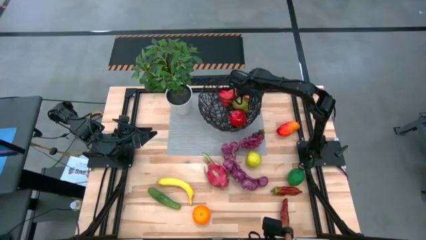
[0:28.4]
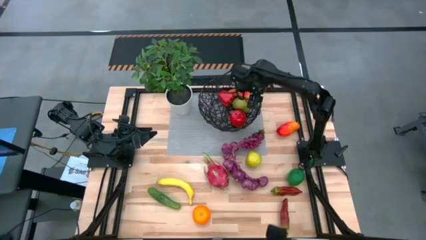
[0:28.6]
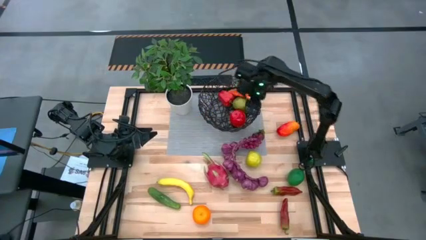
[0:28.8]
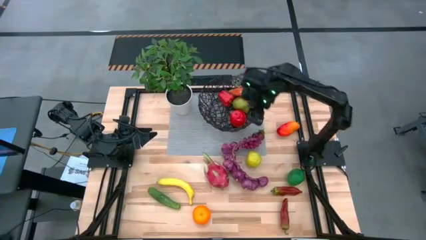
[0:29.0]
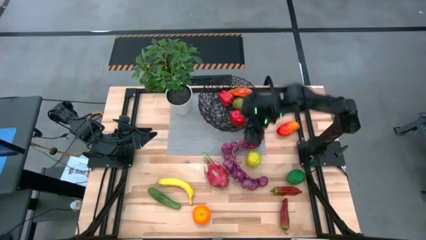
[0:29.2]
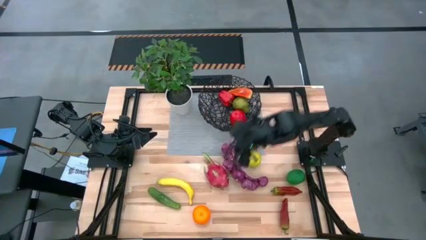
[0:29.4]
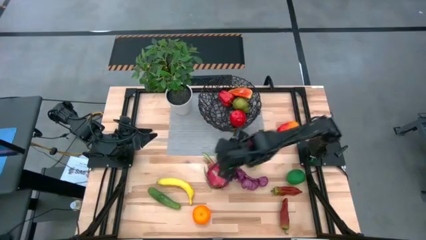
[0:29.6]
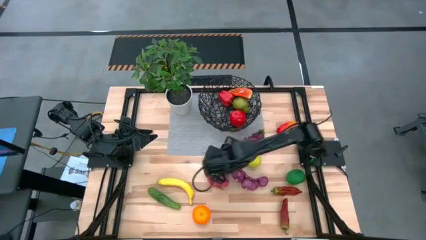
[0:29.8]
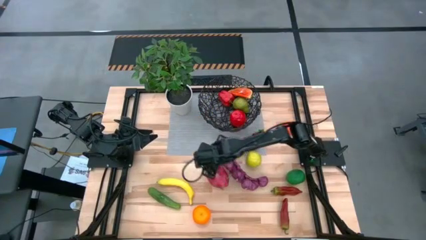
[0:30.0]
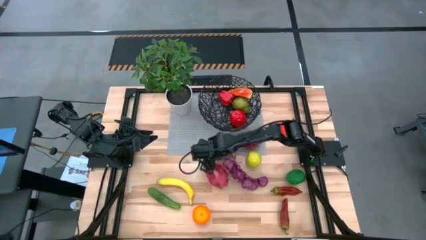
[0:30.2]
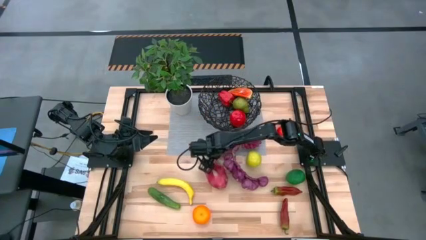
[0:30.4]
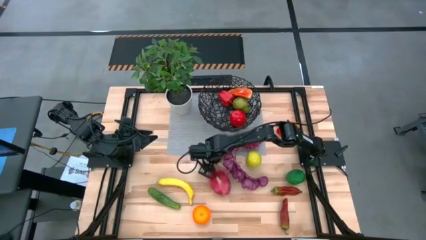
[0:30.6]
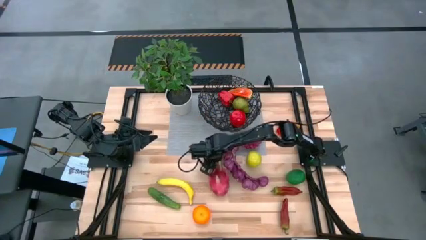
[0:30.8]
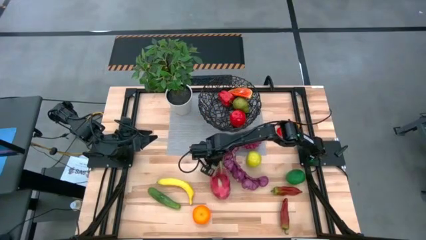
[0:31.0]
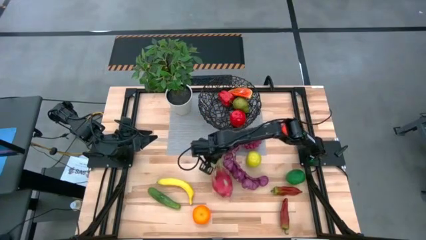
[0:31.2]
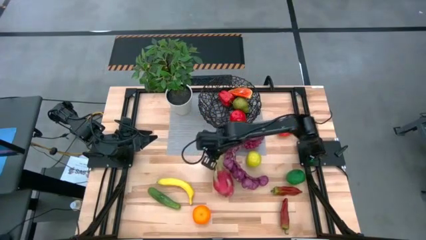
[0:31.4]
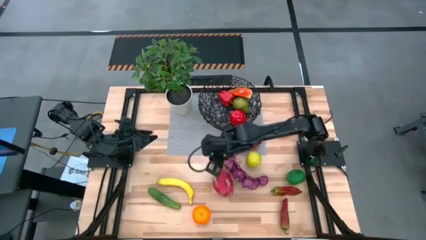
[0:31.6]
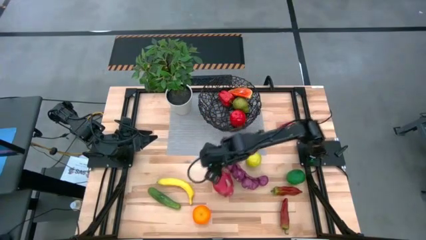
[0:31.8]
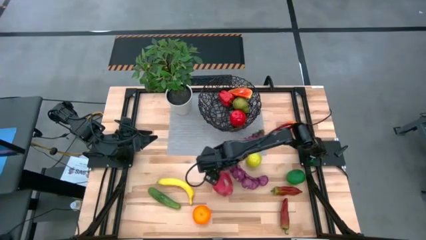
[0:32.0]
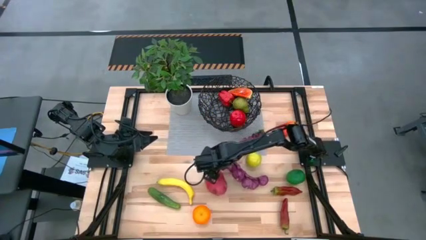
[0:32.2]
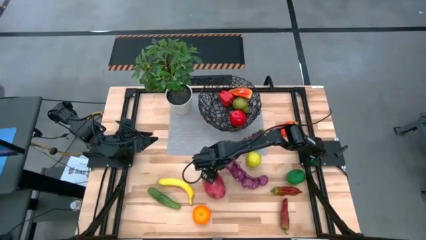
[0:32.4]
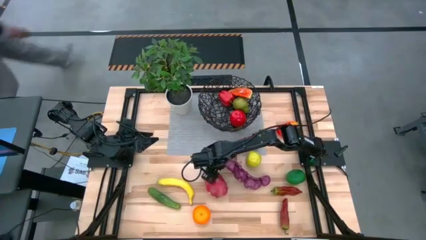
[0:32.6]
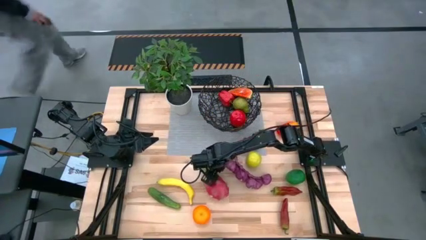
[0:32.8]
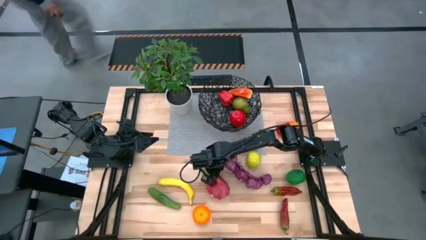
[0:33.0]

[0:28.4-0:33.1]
Task: Build produce basket
Put the red dragon fruit into the black wire basket

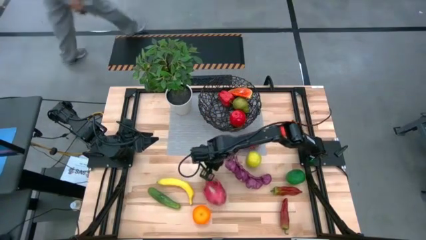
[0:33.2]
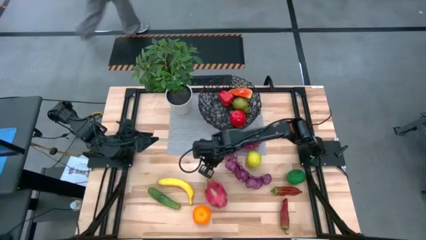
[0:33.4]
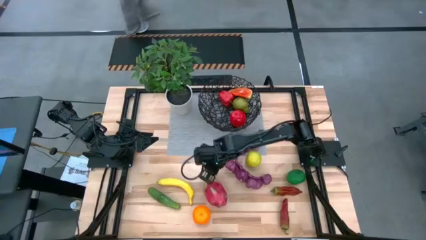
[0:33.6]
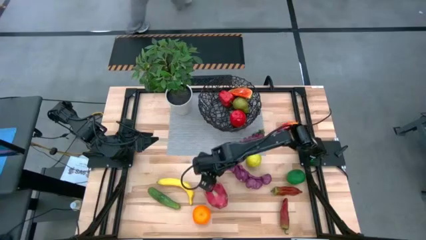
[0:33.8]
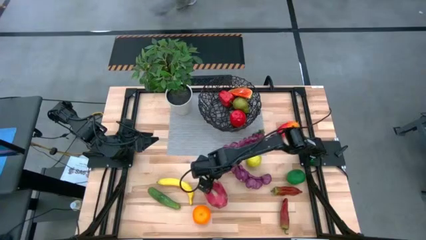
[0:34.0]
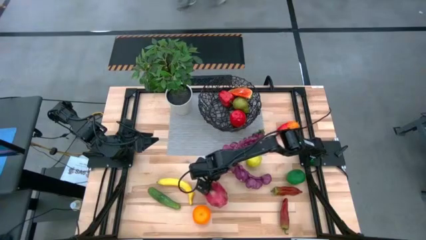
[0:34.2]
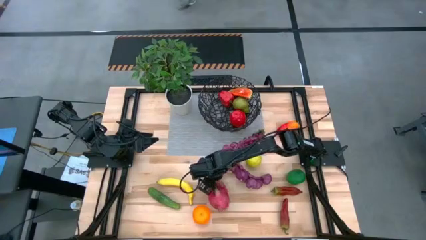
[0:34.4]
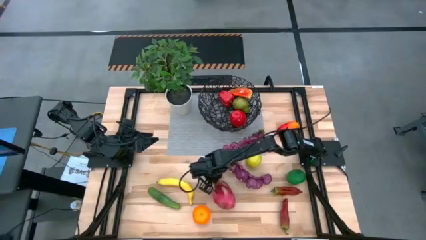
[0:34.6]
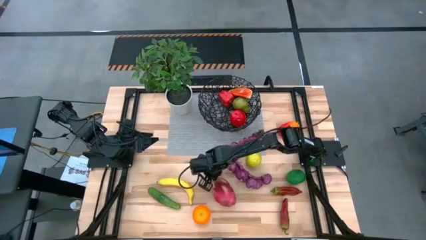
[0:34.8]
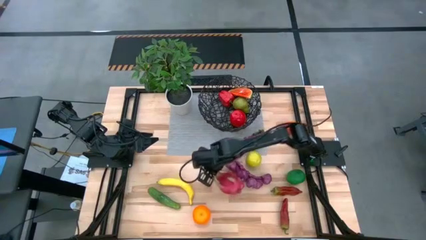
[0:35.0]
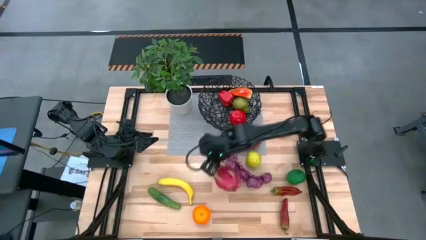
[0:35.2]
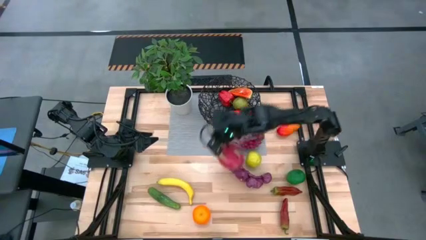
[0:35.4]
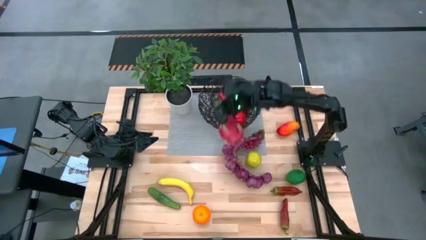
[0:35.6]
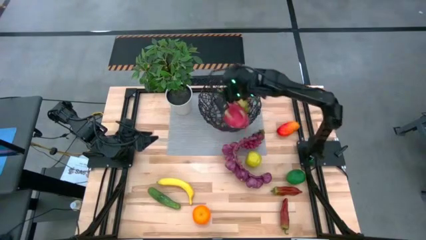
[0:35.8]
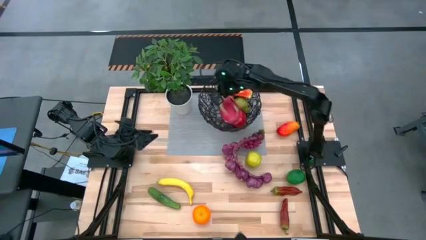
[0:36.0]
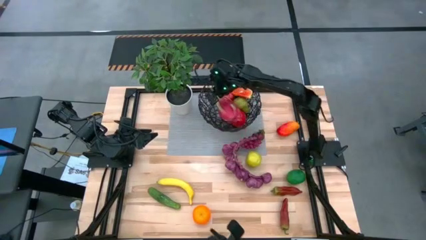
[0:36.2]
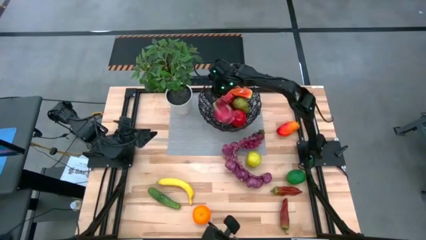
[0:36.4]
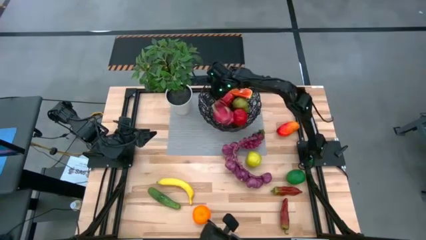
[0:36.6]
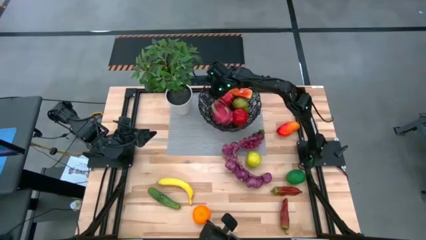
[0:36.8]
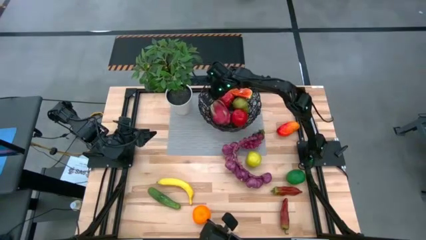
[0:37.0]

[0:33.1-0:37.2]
Put the red dragonfruit into the black wire basket

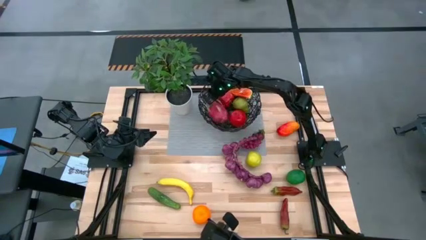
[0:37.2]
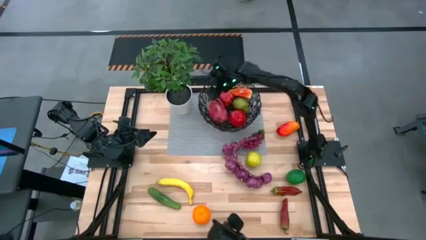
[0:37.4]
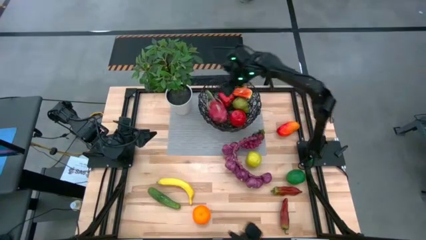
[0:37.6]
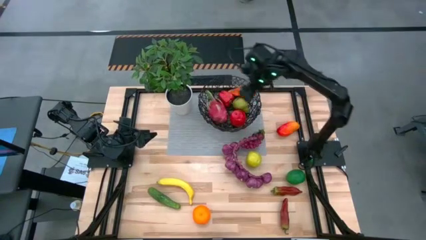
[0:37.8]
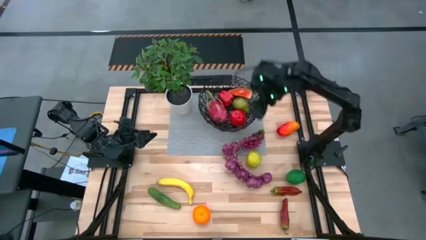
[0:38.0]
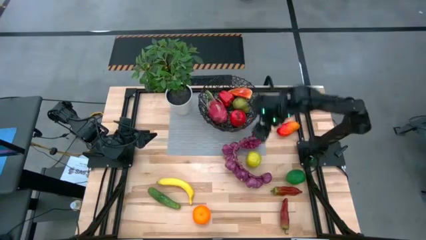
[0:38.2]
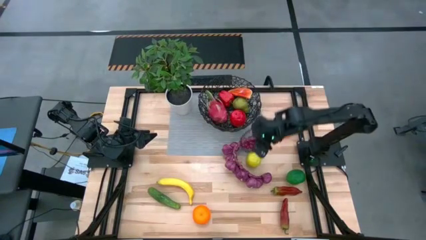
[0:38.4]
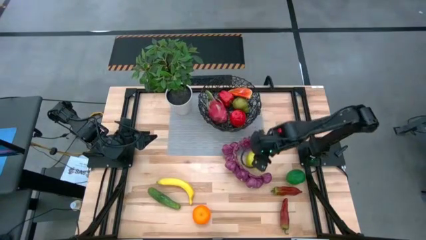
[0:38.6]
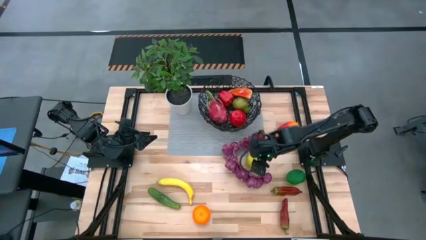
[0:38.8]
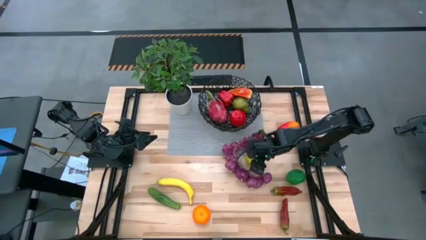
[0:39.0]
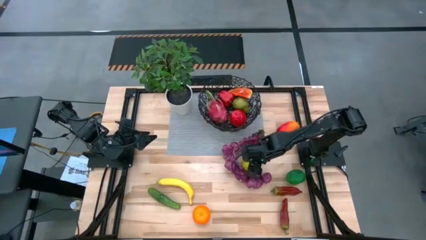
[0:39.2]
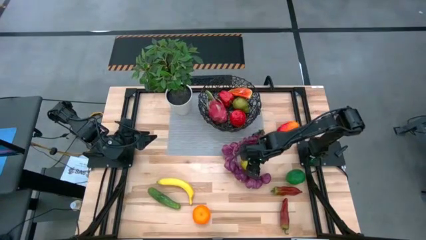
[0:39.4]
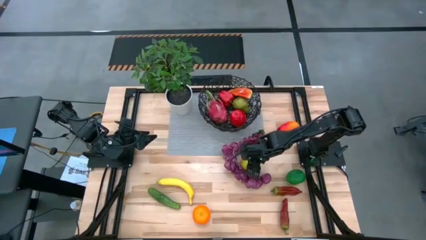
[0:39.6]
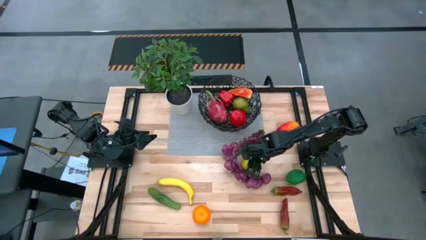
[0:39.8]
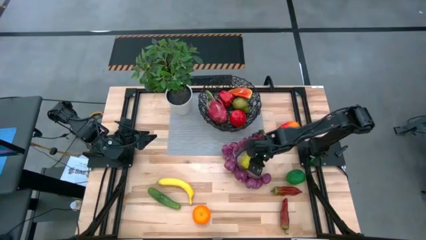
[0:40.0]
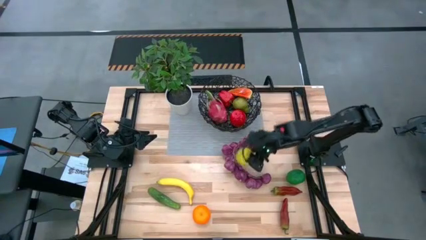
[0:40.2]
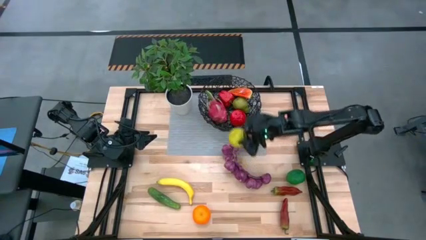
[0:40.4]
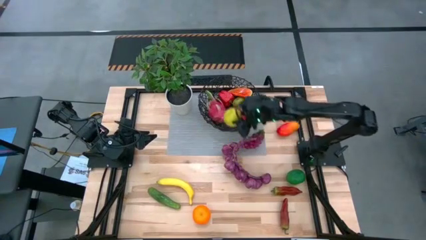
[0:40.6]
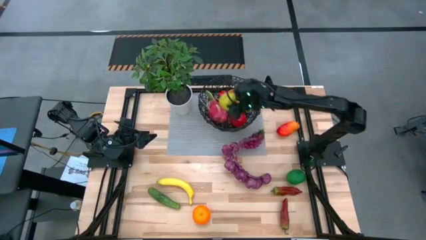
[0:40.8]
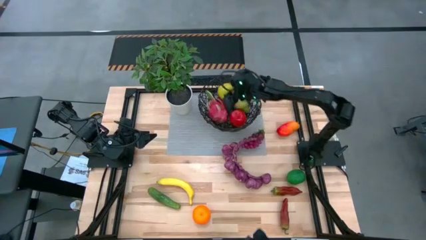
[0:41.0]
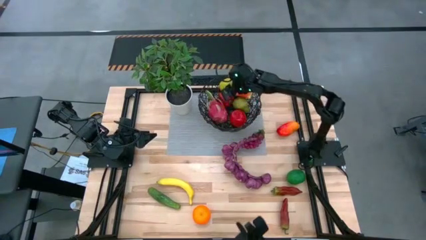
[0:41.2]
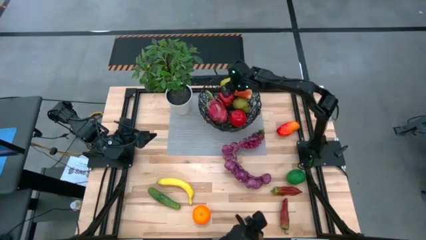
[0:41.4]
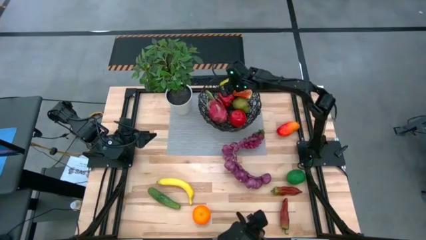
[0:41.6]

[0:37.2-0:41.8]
Put the green apple into the black wire basket

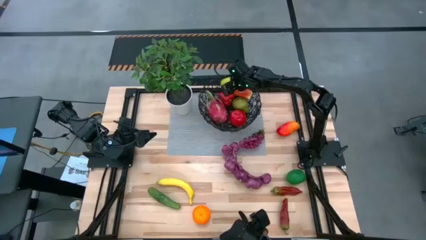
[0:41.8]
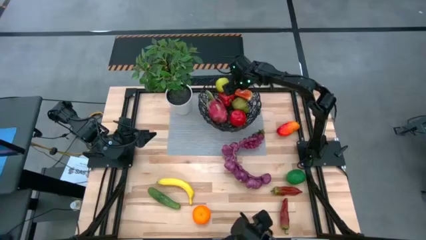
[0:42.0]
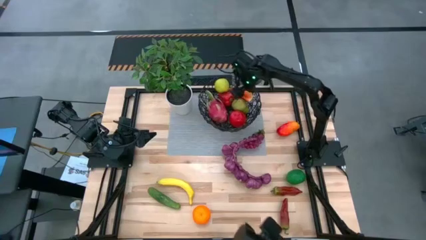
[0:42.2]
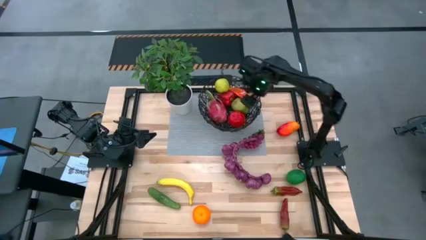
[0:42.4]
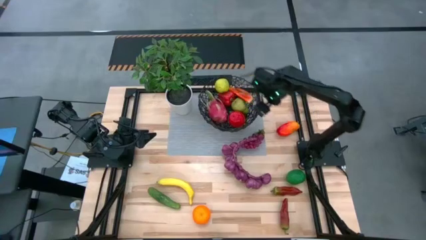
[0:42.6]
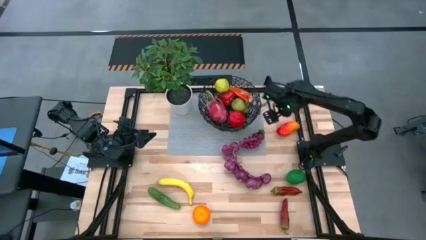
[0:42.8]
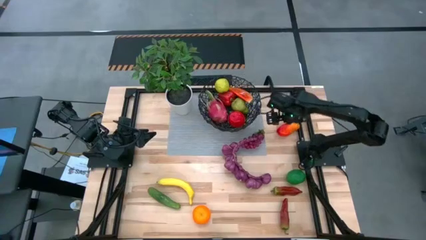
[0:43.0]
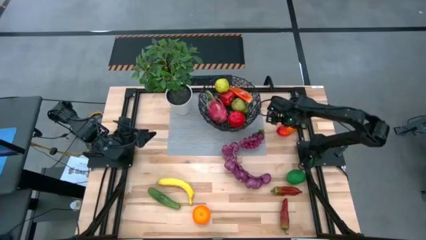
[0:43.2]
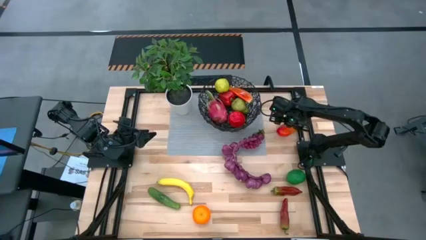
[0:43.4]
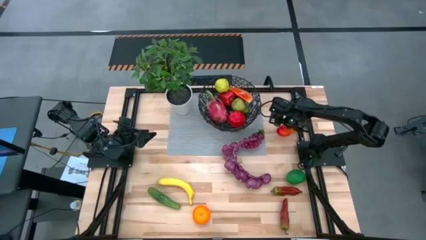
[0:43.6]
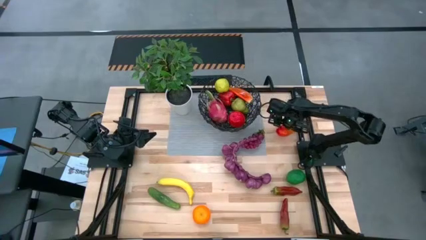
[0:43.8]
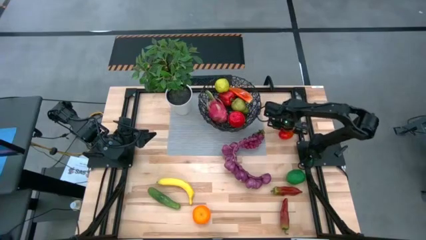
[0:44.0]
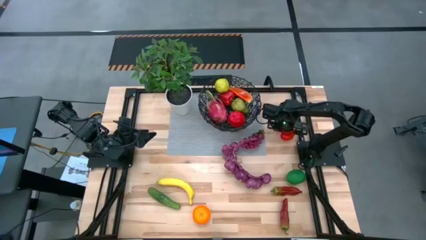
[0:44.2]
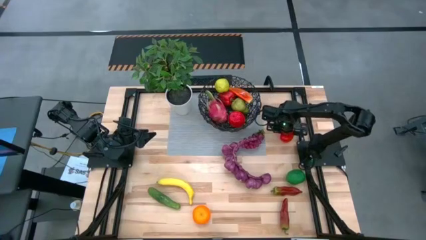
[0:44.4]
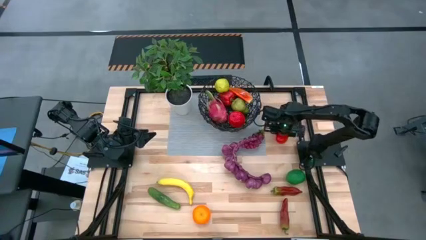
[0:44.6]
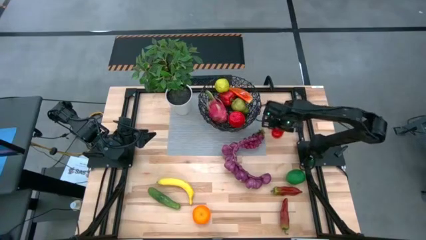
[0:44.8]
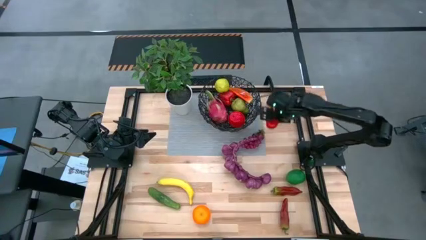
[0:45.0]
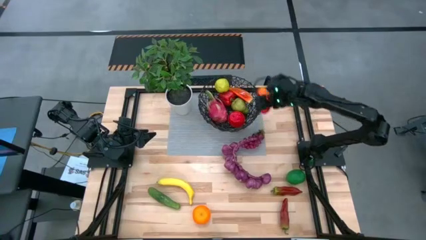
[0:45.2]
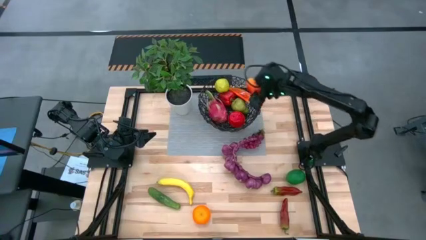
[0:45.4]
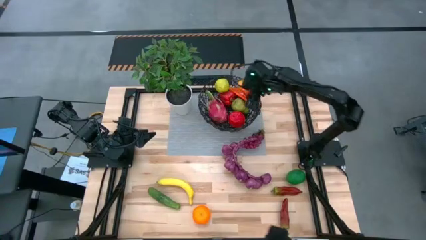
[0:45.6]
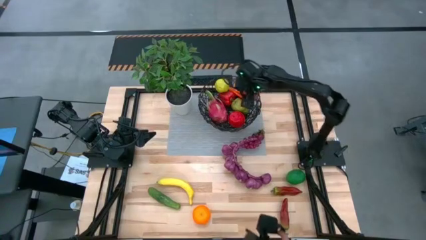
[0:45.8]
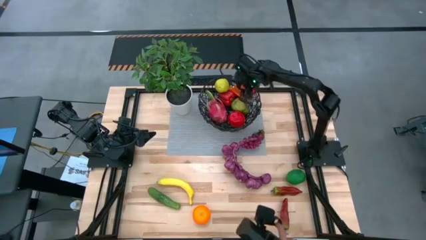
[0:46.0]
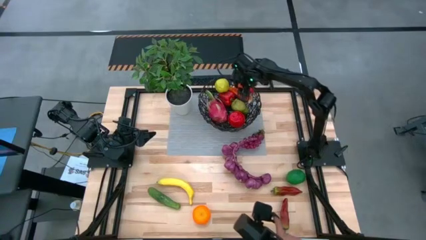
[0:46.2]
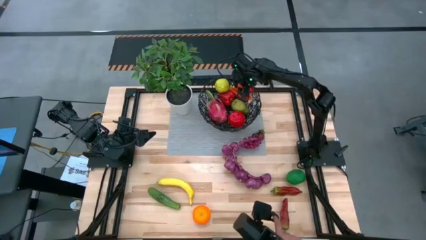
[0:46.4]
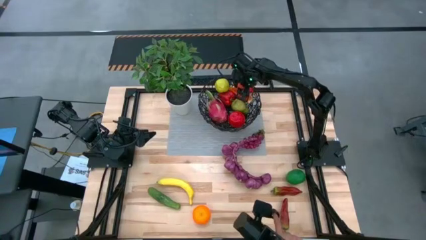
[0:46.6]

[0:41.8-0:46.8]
Put the orange mango into the black wire basket
